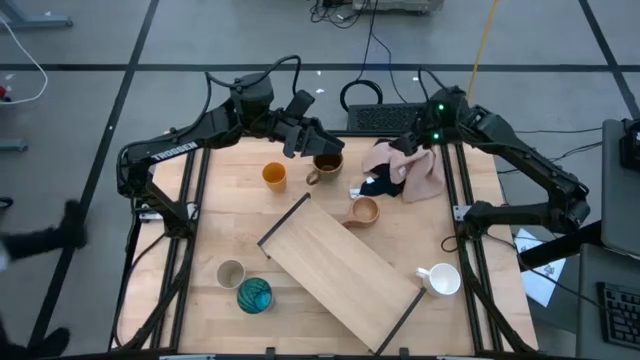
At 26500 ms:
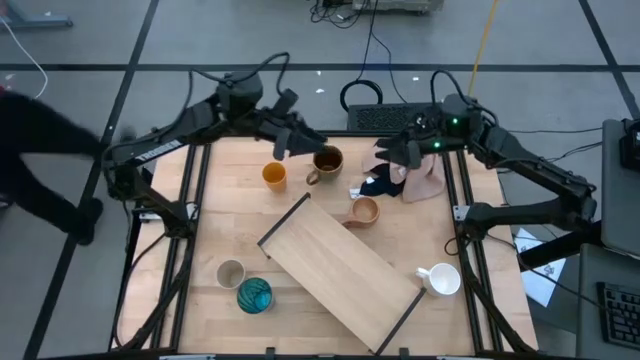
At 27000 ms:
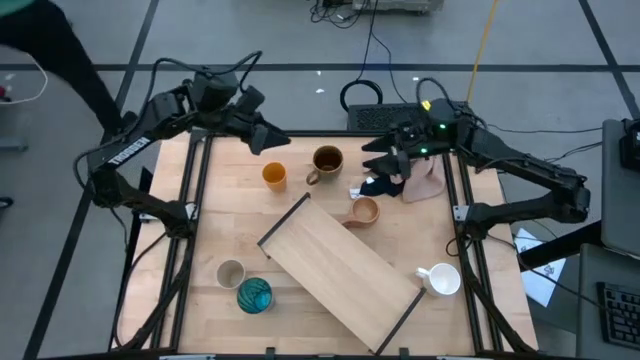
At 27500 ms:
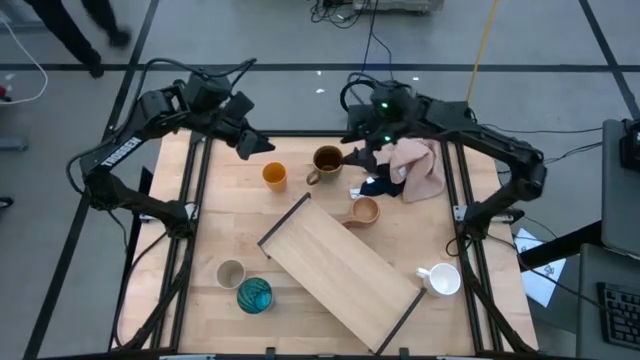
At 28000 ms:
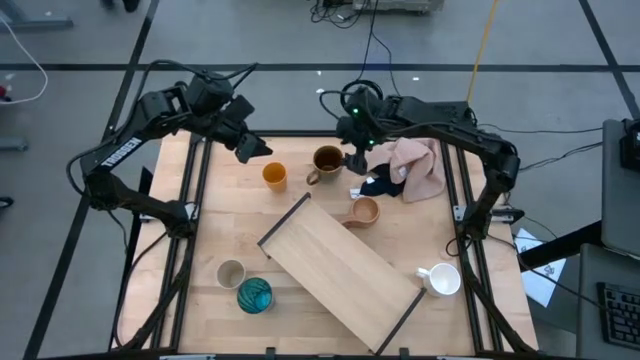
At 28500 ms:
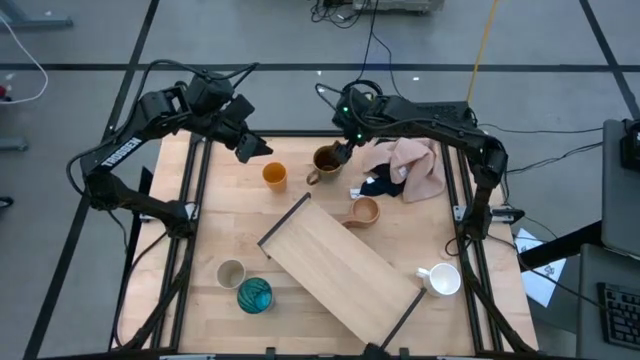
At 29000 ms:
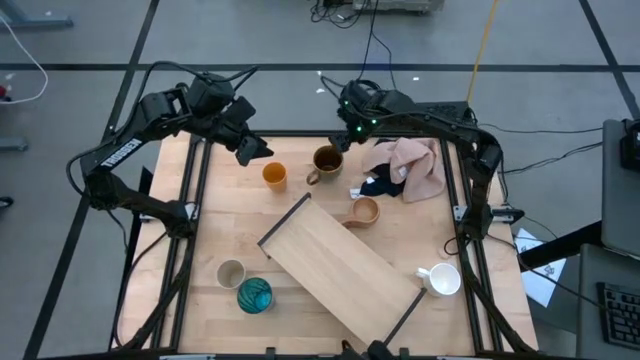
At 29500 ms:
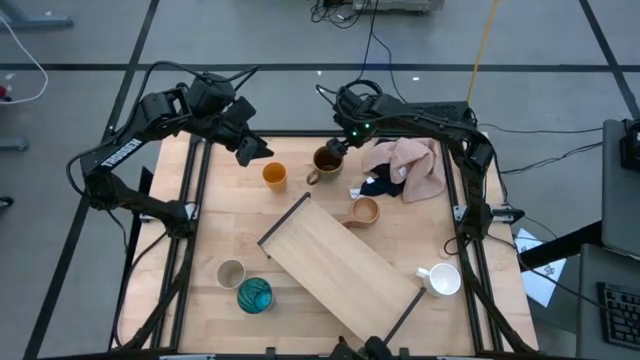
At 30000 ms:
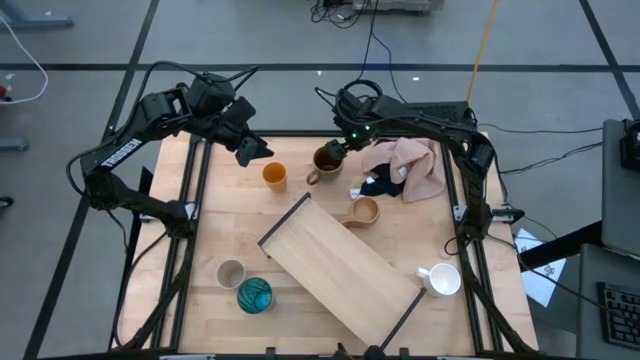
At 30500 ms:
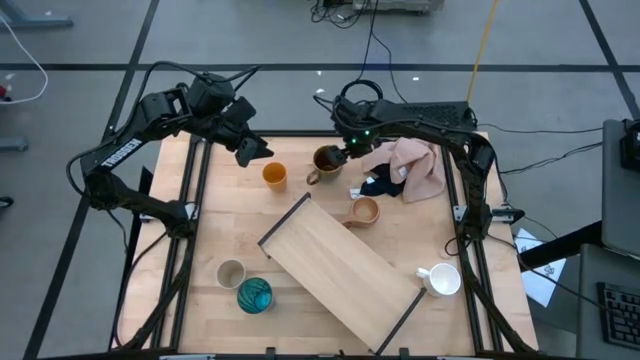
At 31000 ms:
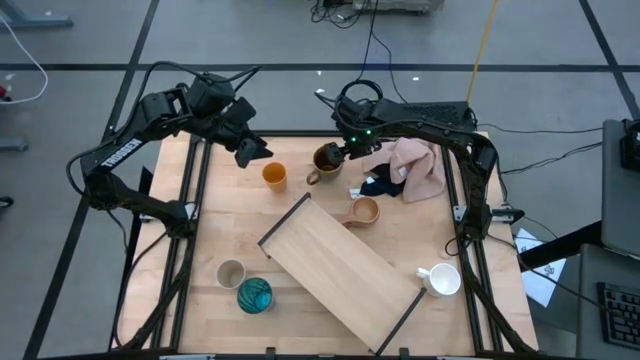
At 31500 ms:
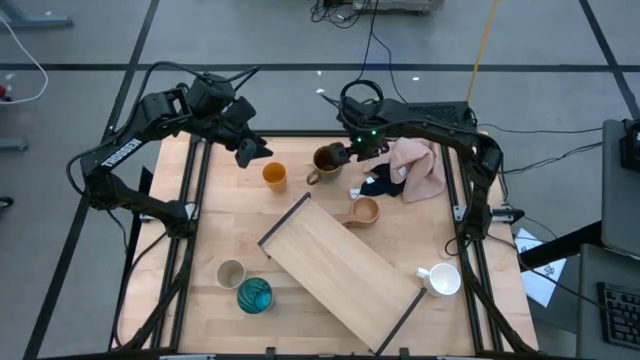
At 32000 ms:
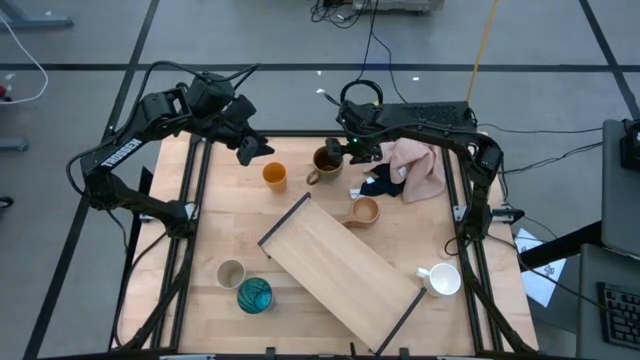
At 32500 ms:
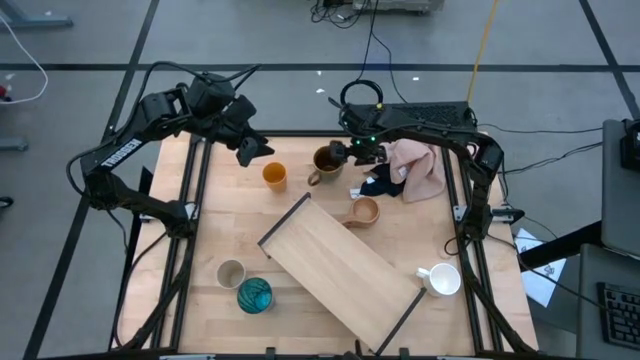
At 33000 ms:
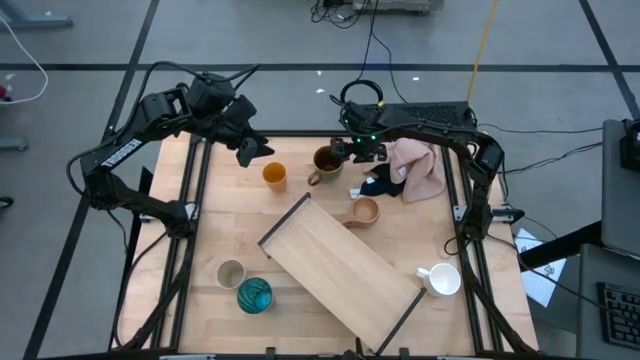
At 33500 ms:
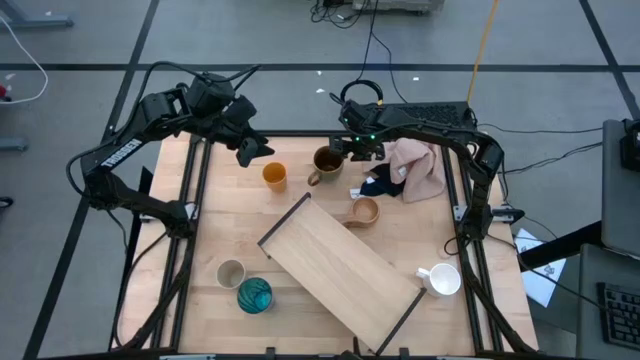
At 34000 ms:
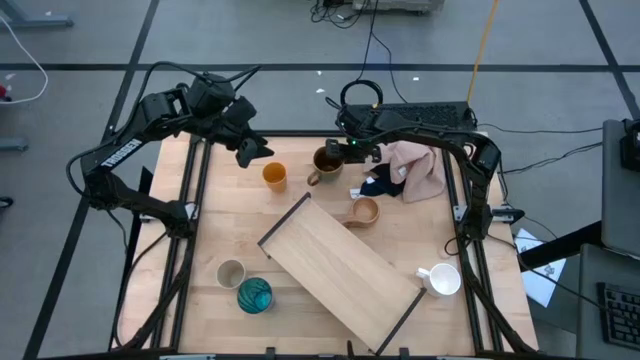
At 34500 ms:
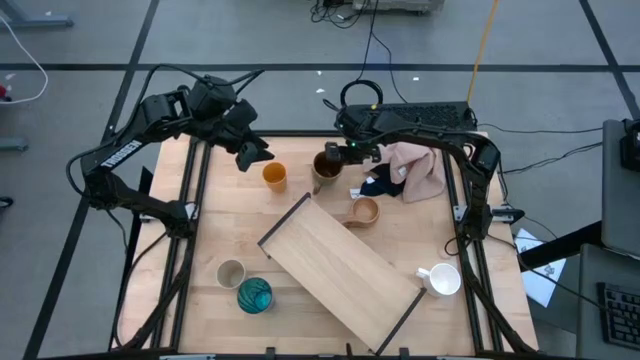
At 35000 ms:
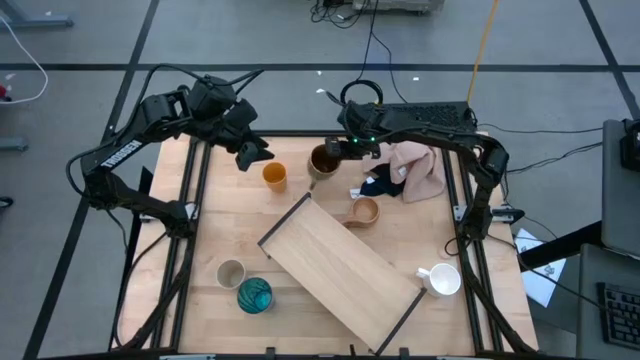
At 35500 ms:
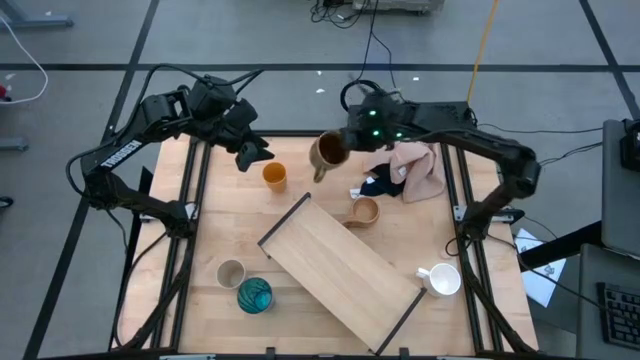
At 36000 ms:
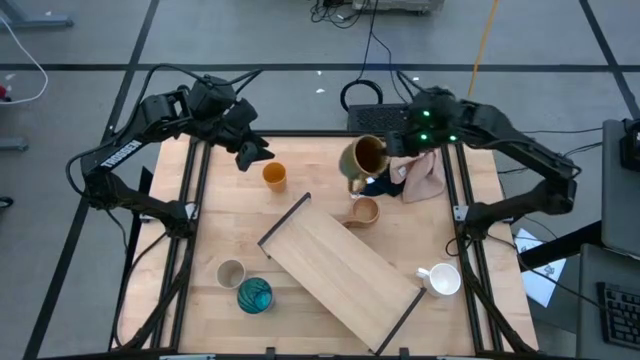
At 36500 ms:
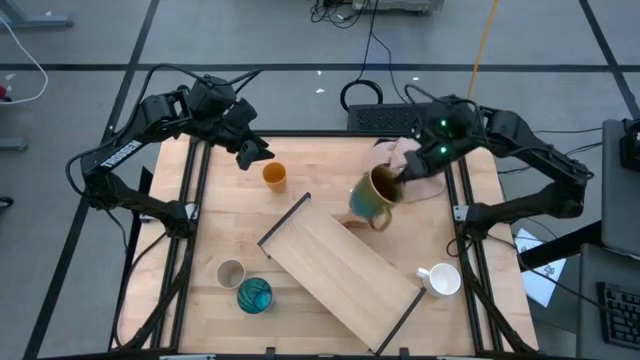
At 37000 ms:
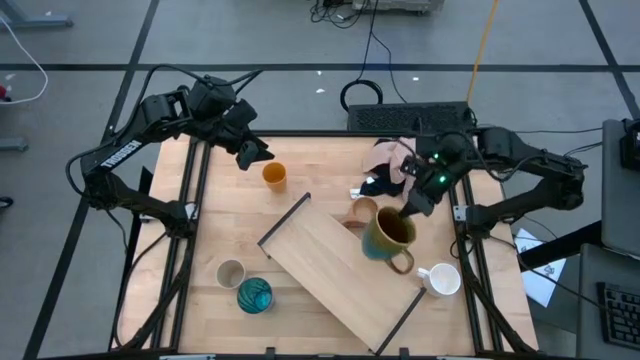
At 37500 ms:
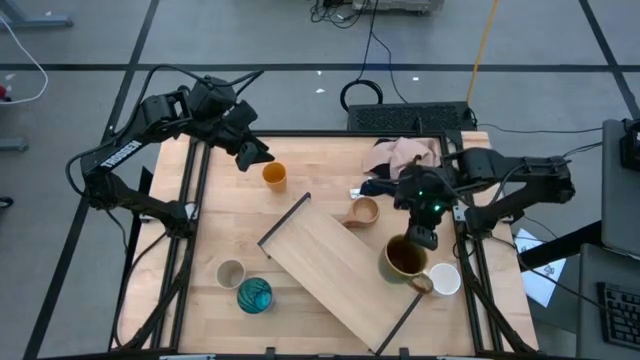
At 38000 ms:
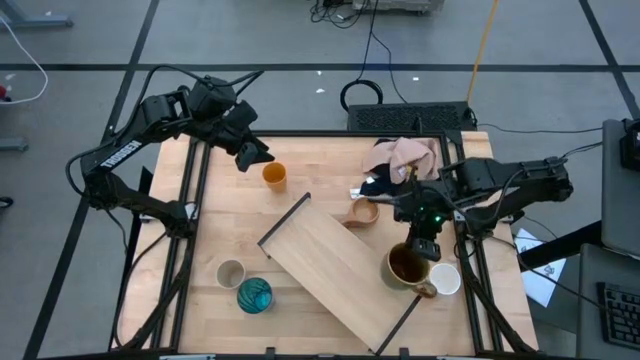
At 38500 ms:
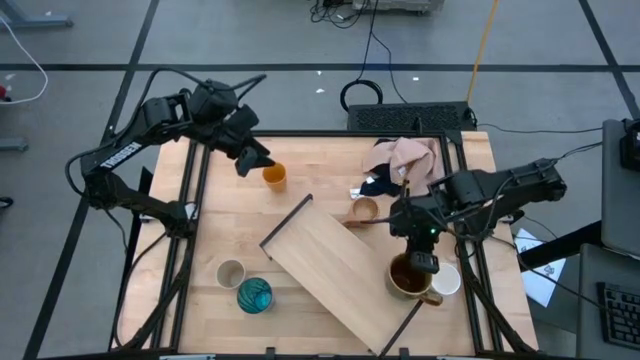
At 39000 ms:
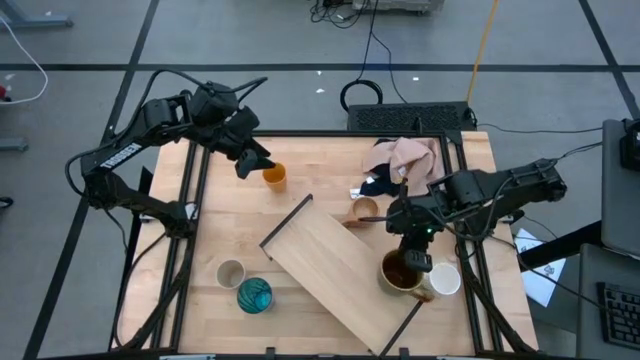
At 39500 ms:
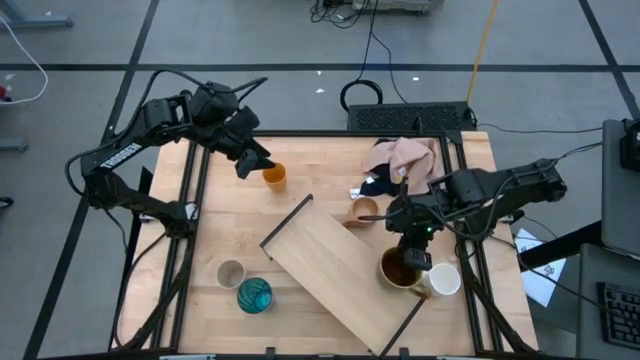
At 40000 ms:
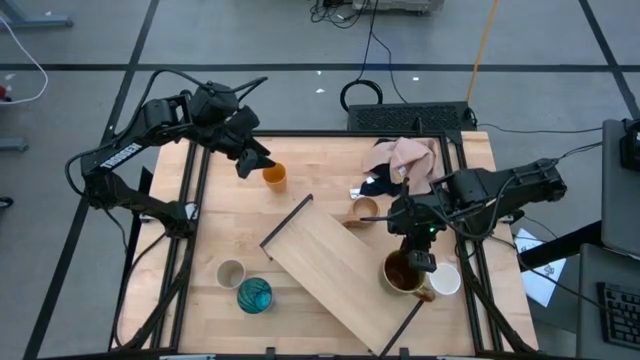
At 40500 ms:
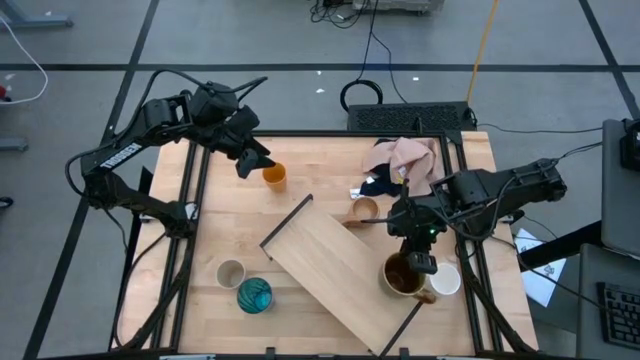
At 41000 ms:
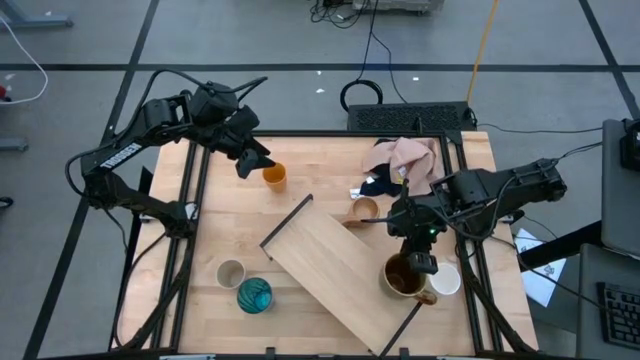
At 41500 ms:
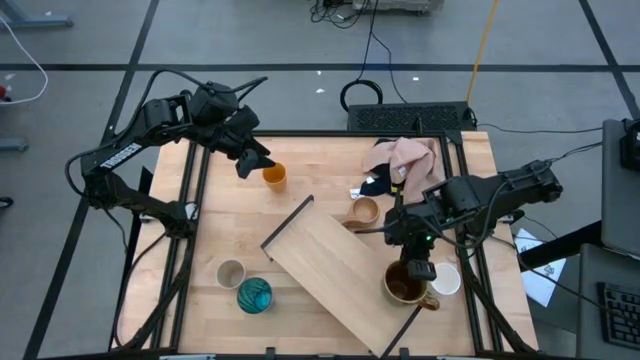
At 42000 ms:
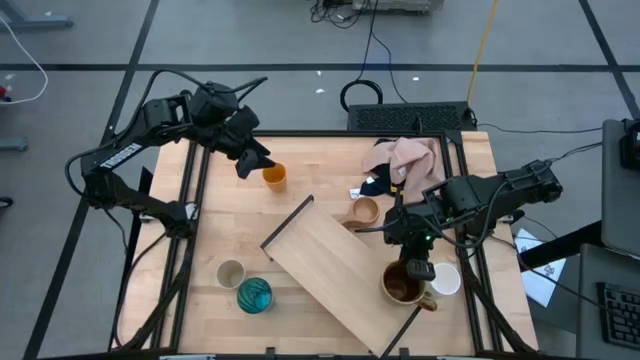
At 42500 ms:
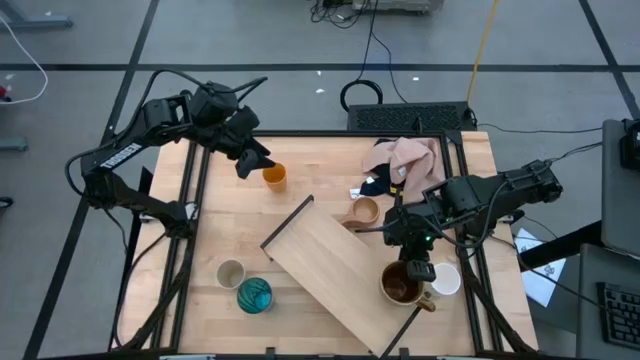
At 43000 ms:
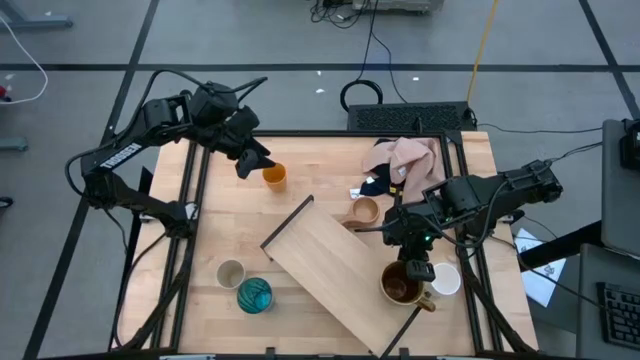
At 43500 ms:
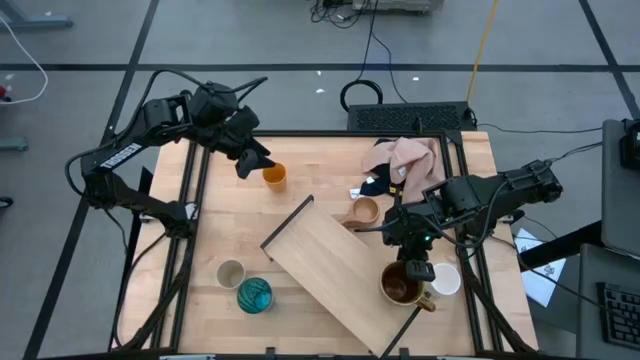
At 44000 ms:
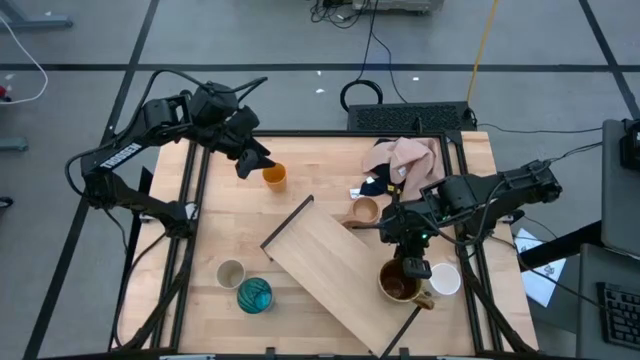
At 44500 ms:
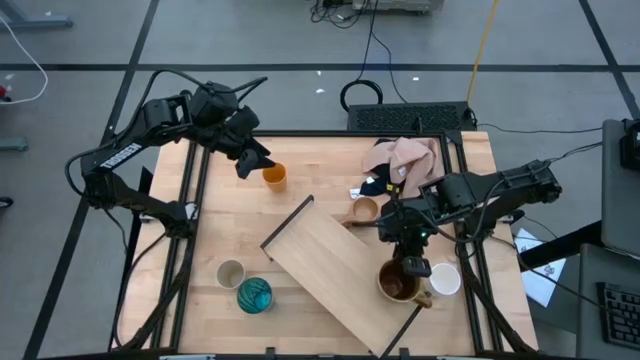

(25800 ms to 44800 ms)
Task: Stack small to large cups/mugs on shelf
Put the green mug on the shelf

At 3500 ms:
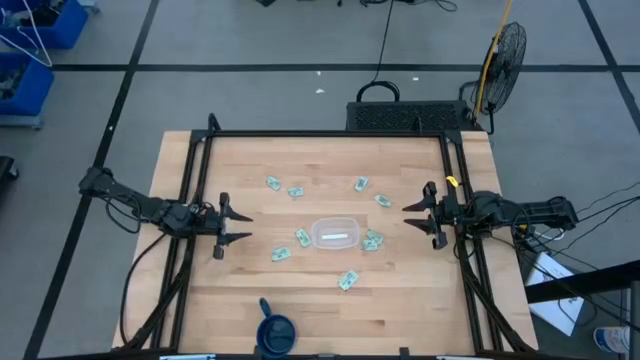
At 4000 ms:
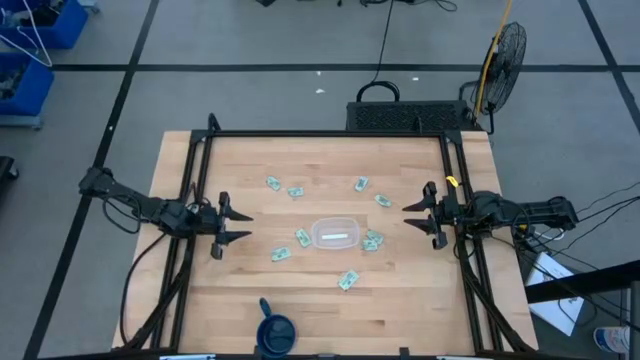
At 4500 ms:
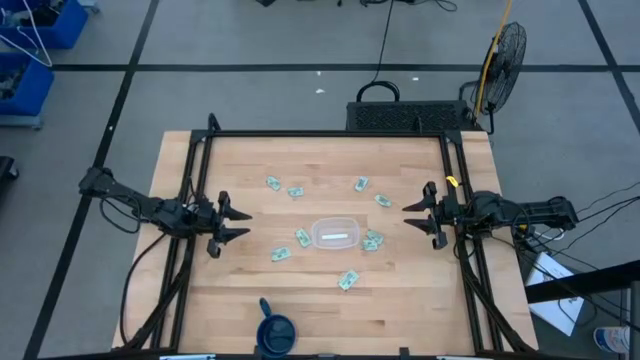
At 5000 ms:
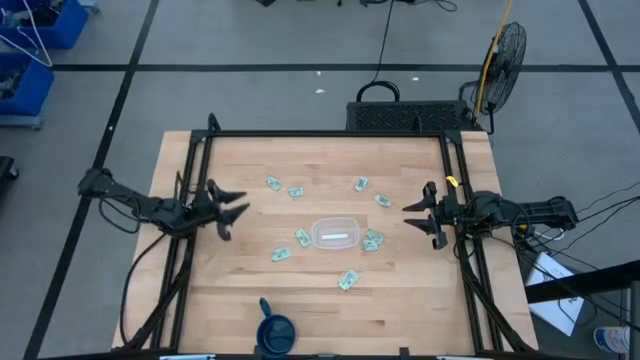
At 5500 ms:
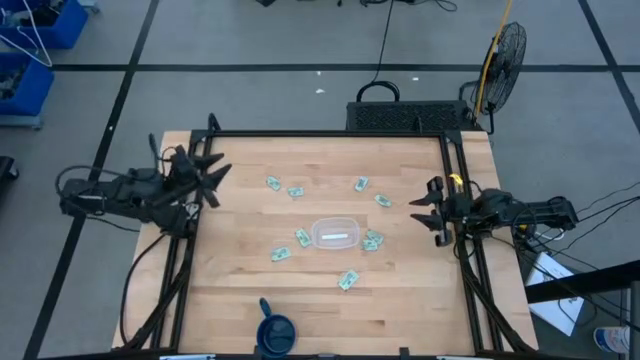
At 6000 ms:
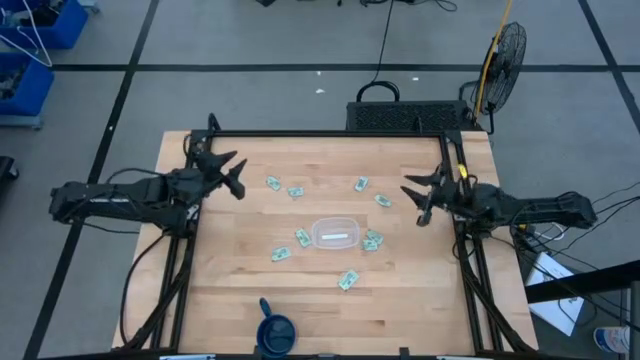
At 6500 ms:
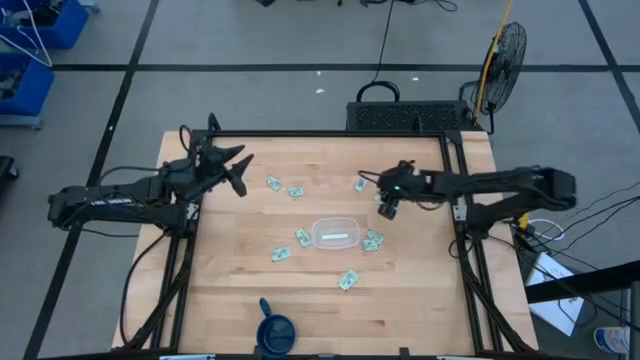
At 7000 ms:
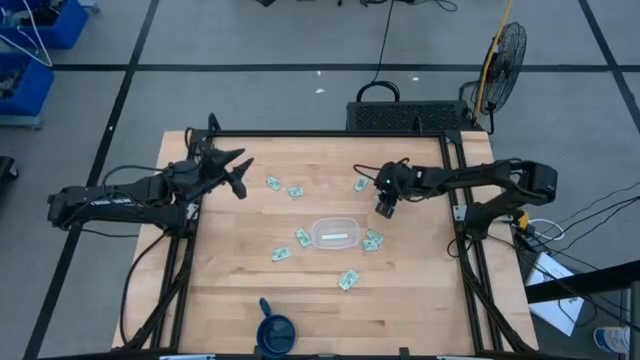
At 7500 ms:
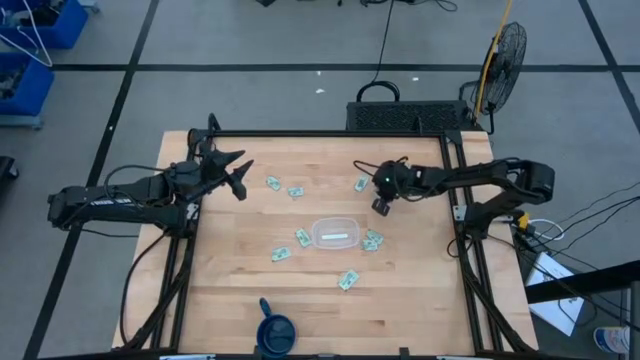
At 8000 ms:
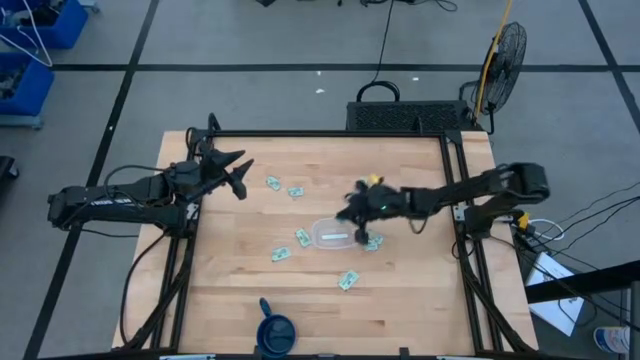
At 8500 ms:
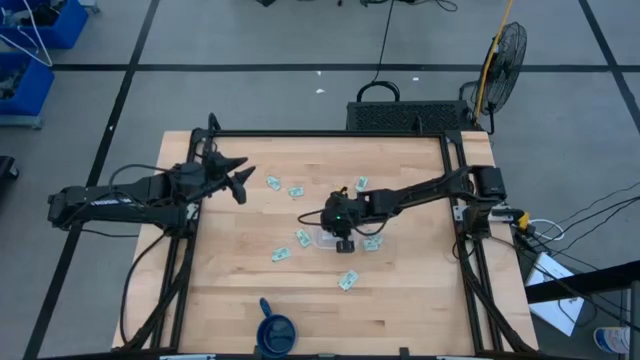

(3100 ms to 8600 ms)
Task: Pick and place Stevia / Truvia into bins
Put the stevia packet into the transparent container
